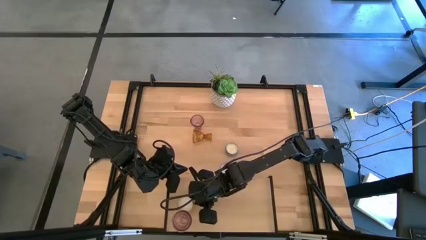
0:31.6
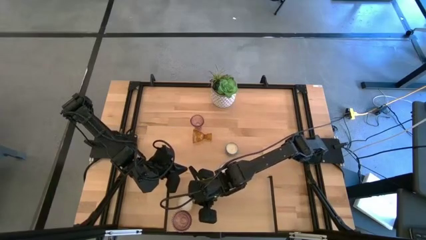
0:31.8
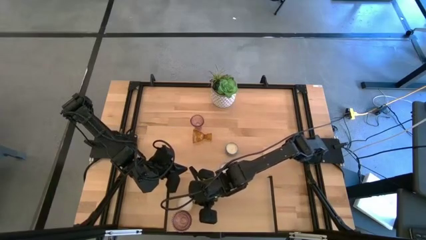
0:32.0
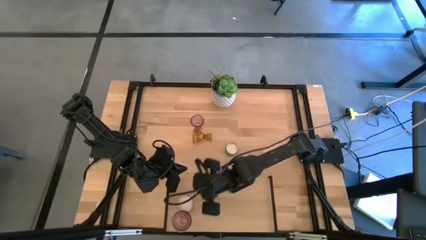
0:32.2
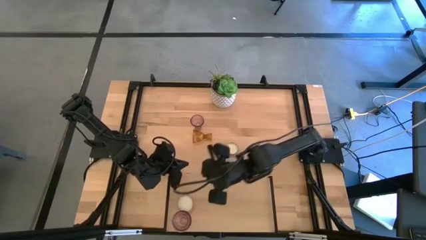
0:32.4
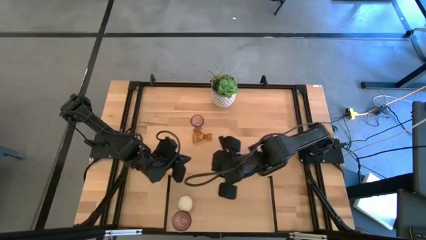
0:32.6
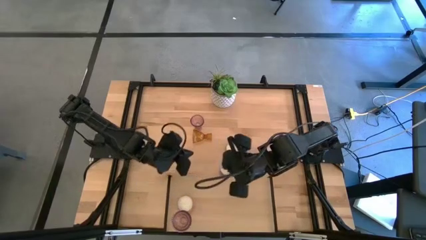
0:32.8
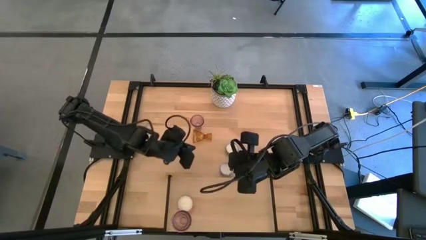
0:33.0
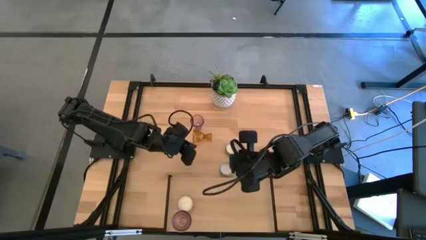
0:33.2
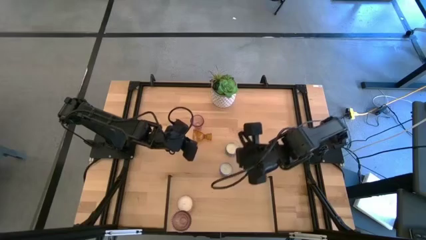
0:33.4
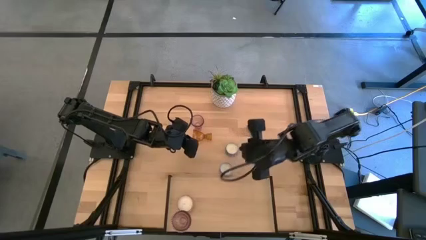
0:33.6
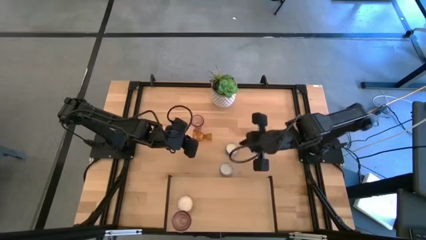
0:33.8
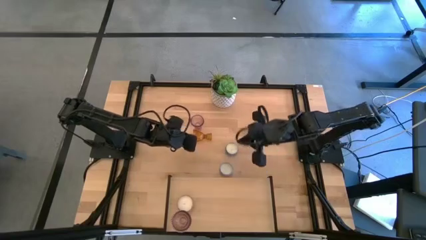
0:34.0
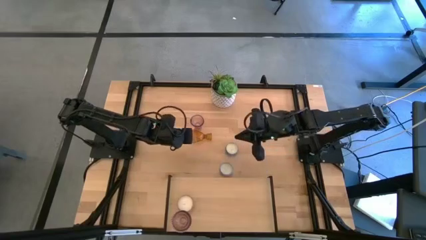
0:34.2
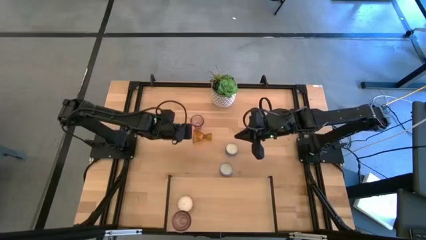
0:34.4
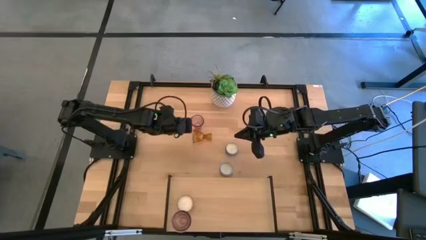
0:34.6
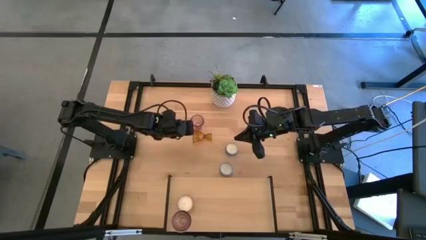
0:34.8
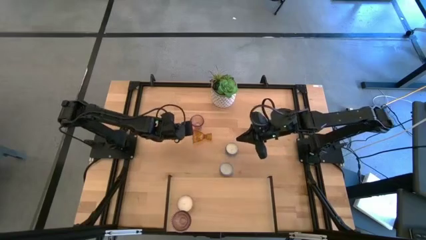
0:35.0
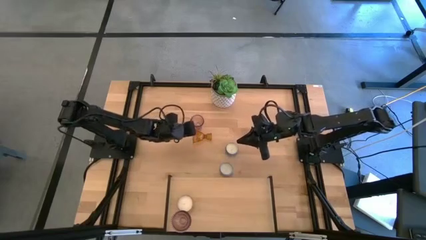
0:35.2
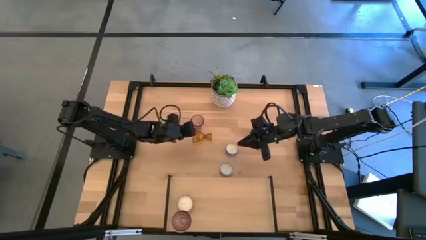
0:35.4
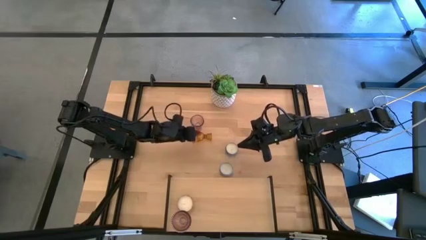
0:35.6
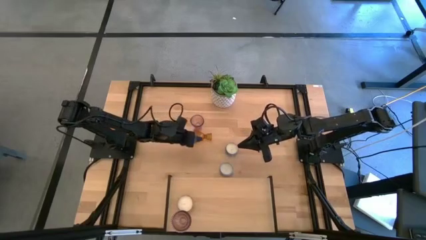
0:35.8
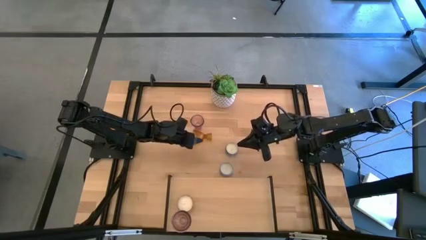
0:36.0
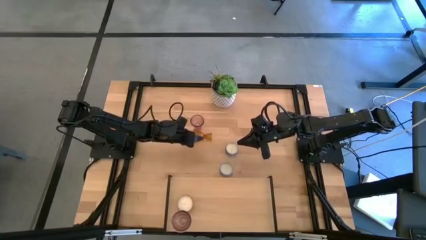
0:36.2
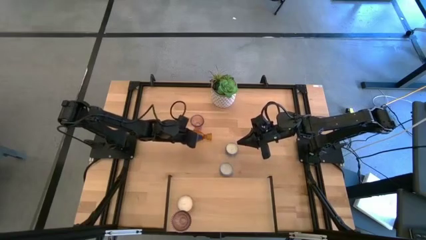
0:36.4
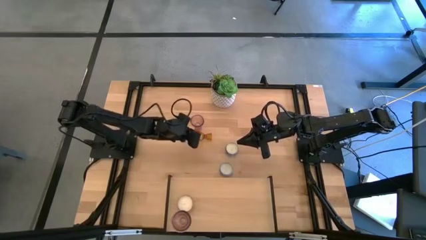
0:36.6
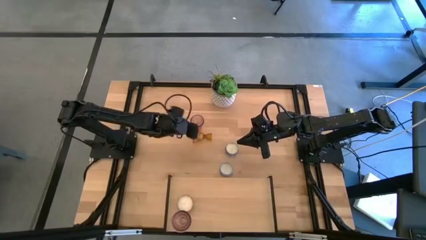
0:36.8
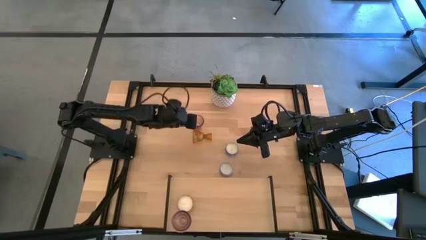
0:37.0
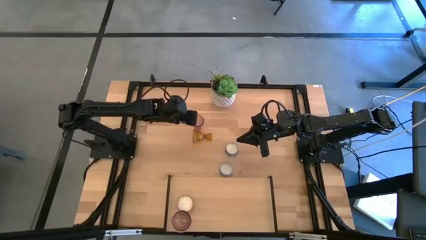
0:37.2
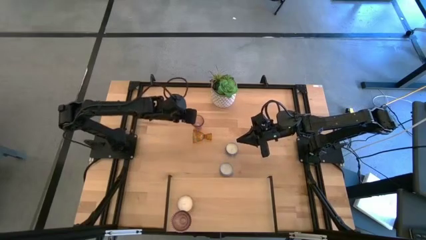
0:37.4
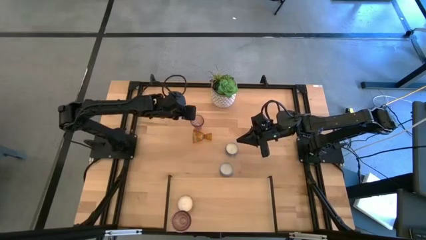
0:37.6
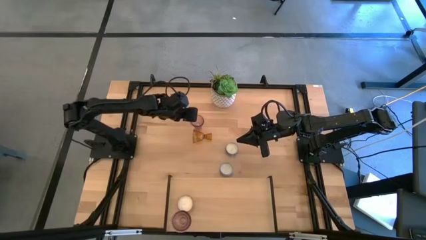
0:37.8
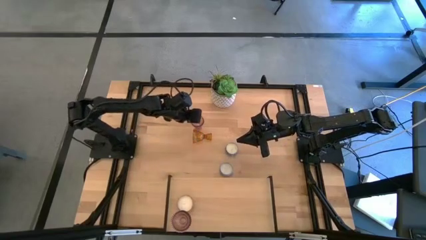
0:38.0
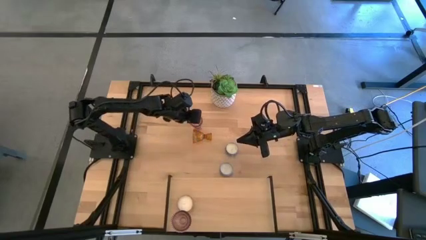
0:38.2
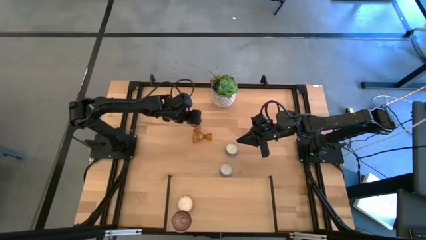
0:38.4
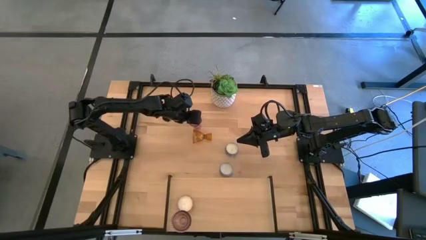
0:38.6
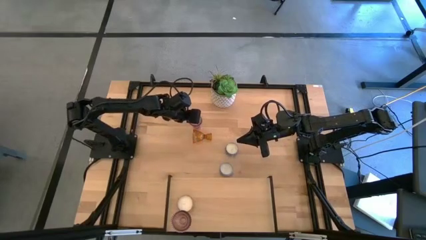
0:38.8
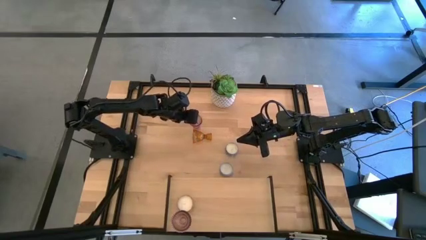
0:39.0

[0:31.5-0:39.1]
Task: Pick & Place candle stick holders
Put the pink candle holder on the shelf

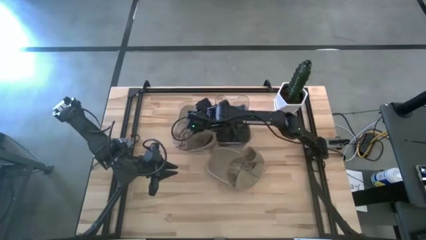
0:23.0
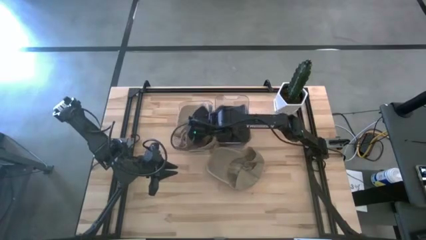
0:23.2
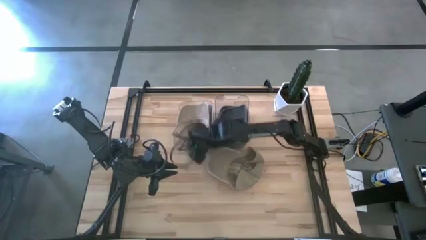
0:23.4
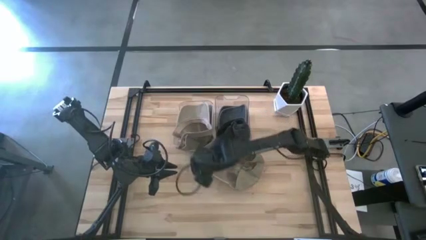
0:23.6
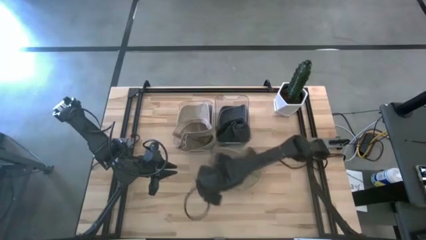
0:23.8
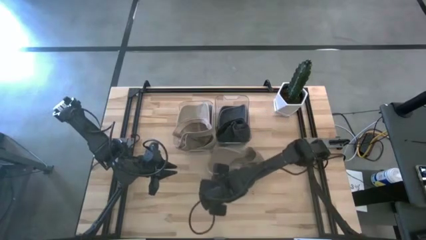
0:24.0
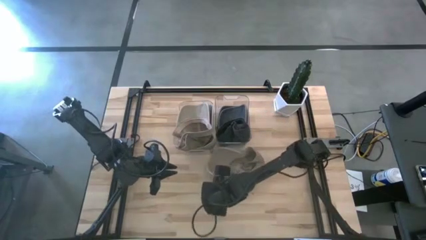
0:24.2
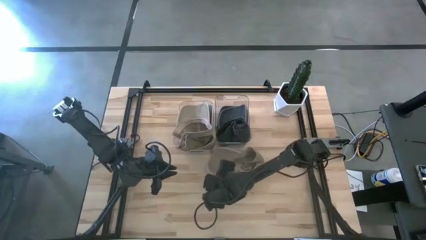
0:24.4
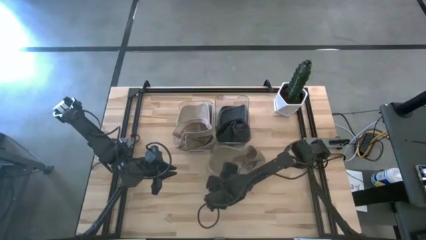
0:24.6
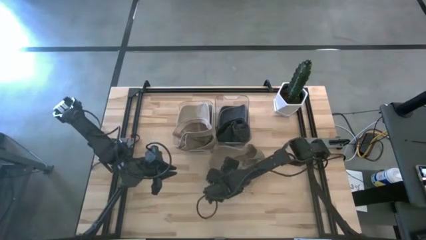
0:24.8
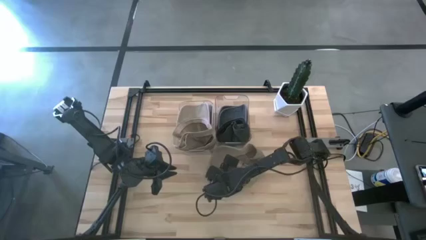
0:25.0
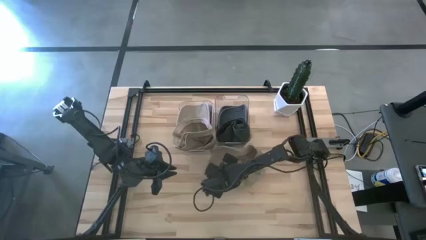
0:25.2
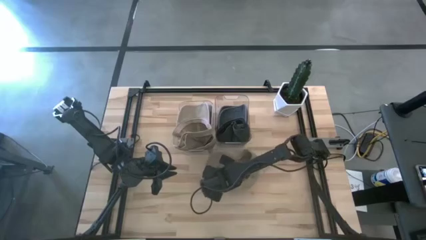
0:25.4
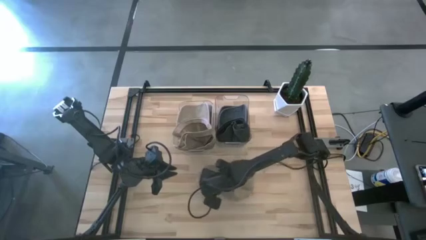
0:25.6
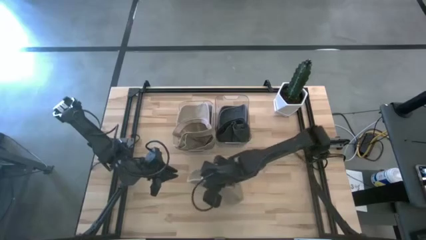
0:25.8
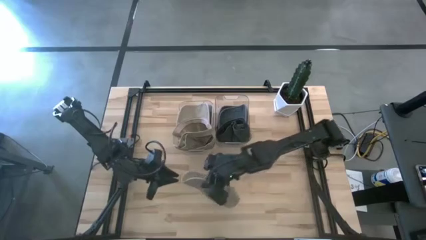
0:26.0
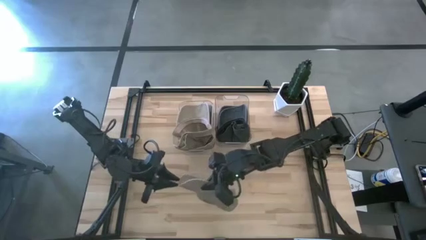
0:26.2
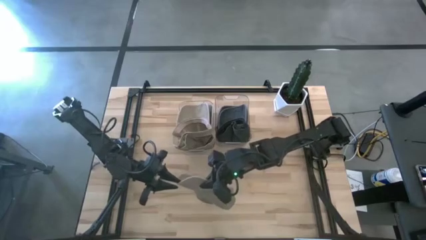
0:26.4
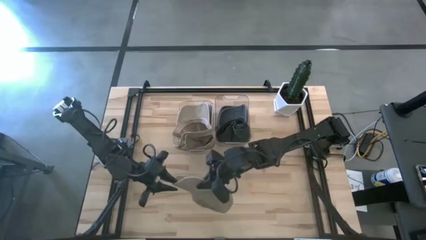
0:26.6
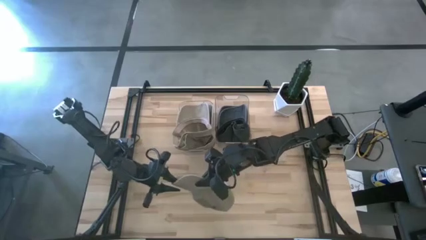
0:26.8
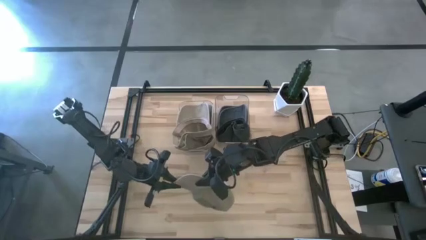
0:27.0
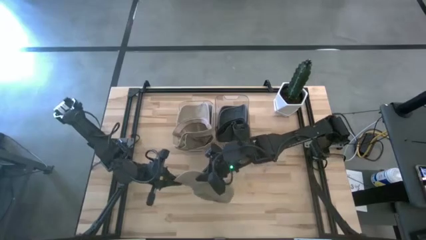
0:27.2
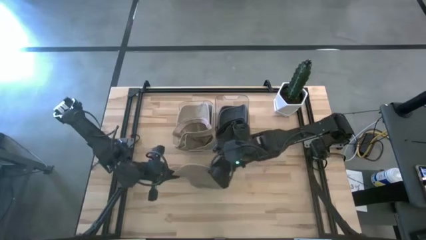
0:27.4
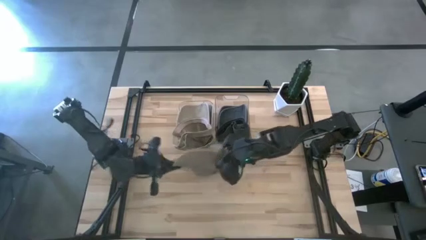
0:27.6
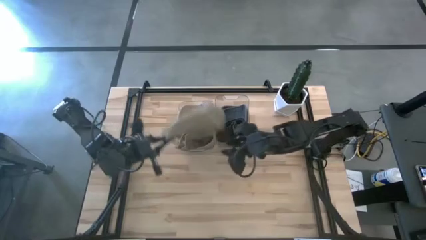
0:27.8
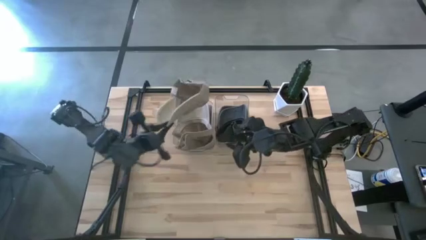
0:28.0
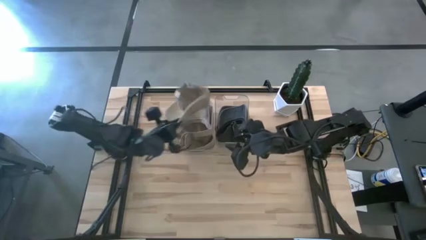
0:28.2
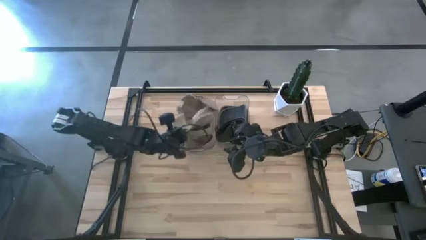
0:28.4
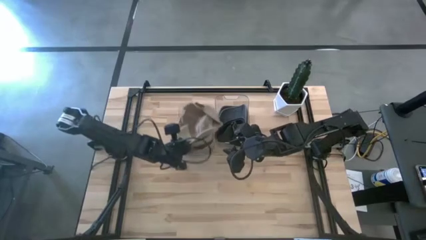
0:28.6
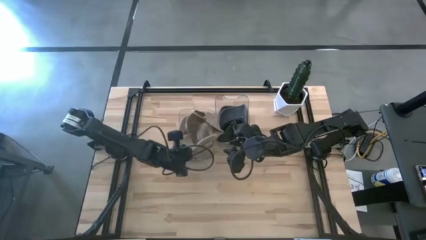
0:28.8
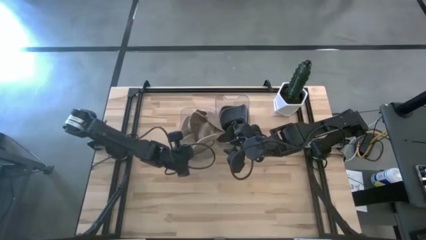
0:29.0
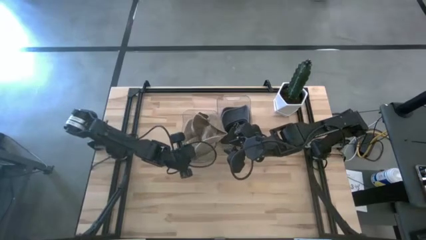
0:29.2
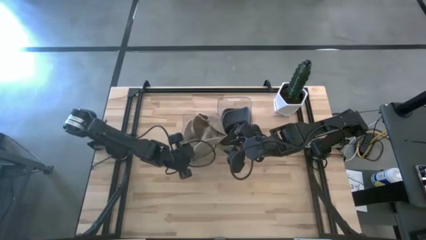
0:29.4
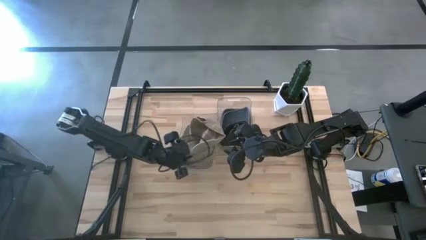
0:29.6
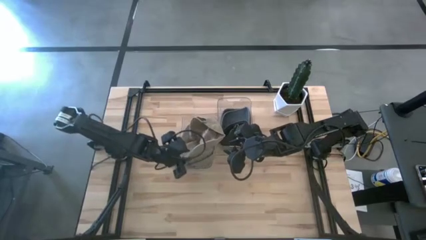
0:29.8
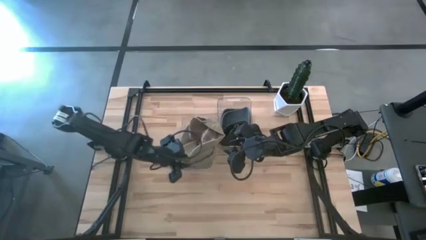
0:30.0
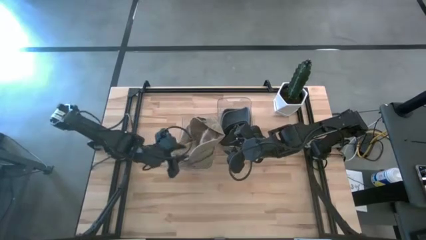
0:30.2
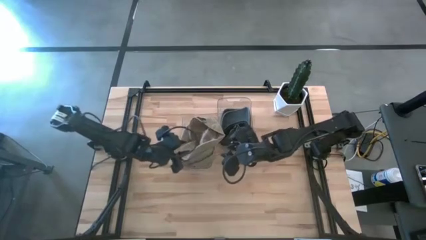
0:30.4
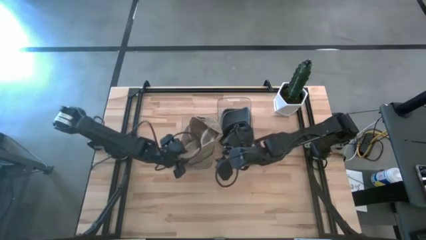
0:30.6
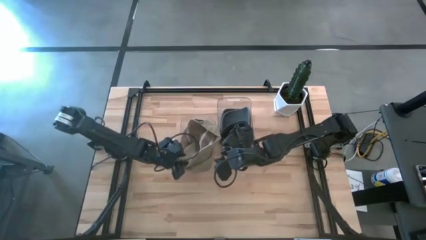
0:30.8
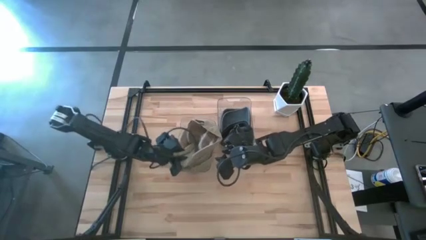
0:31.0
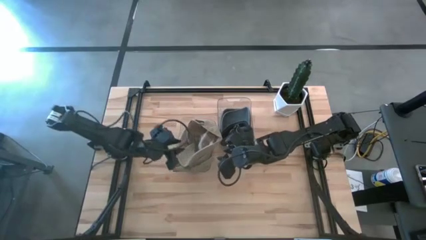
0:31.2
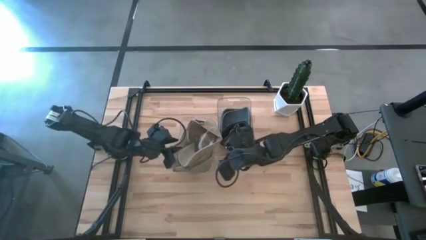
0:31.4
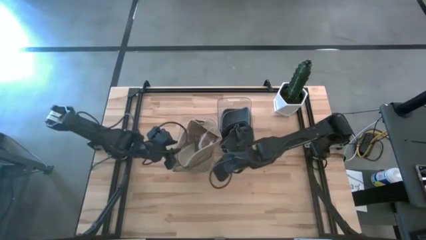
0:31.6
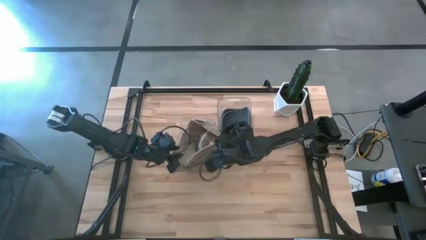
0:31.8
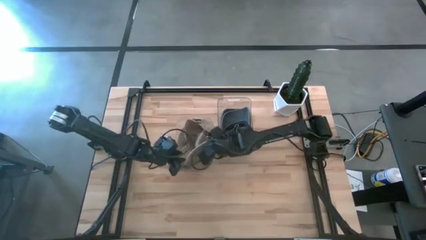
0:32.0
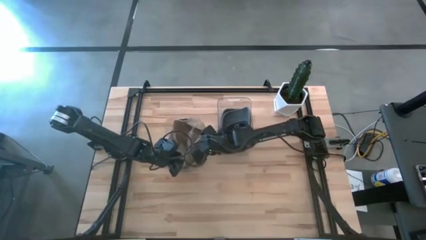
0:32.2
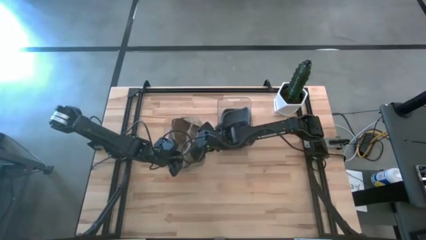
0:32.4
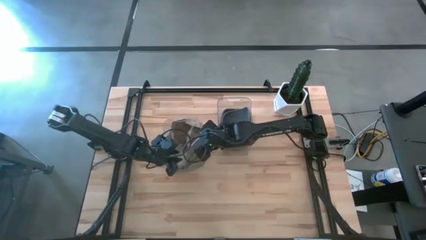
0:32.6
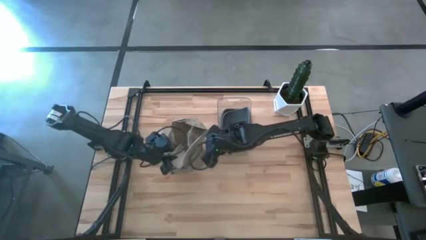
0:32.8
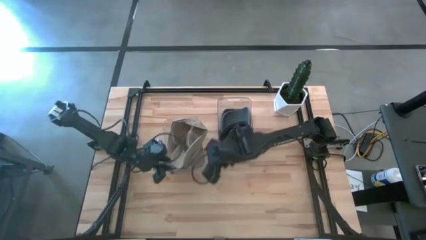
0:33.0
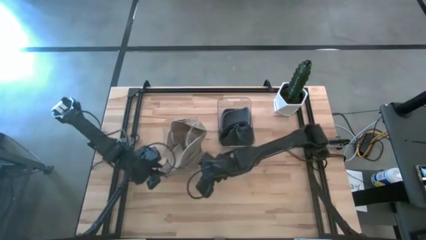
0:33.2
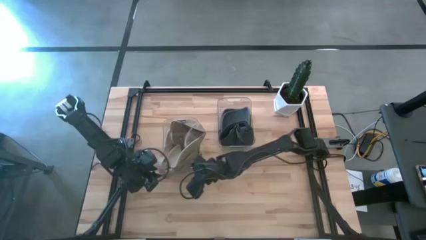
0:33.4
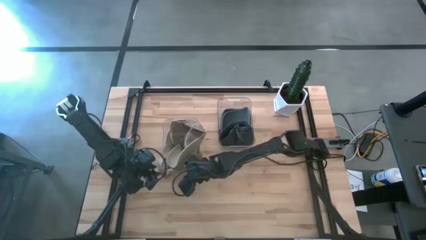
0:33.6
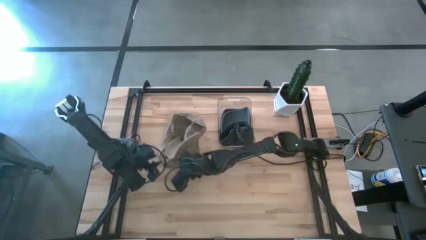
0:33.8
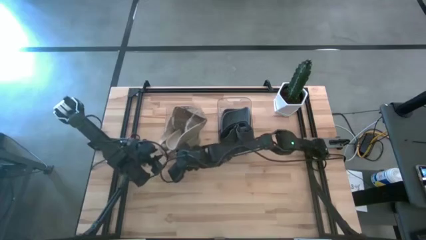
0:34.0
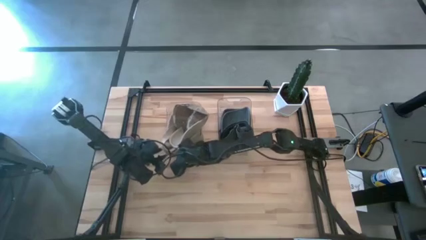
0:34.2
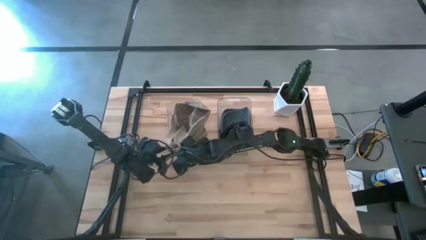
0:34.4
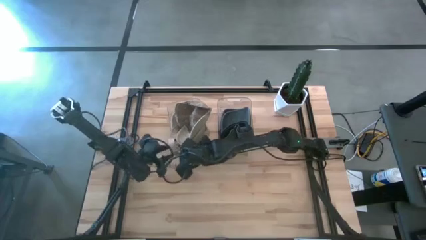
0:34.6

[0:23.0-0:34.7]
Task: Pick & Place hat
Put the brown cap into the left transparent bin
